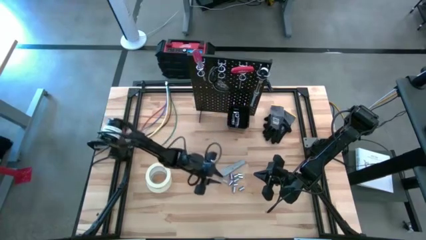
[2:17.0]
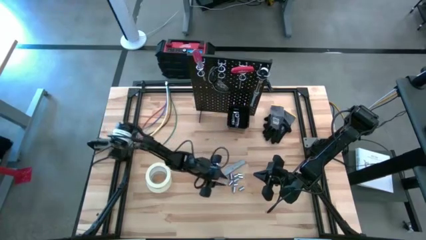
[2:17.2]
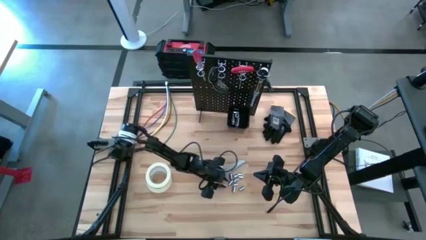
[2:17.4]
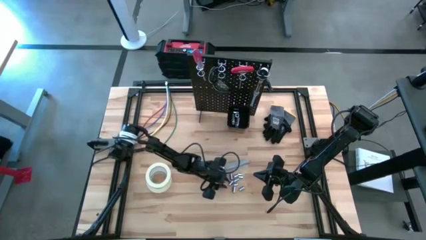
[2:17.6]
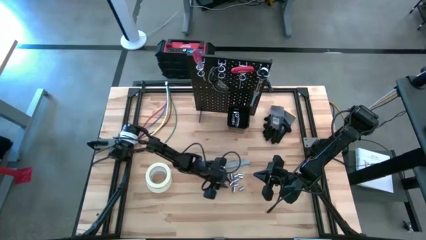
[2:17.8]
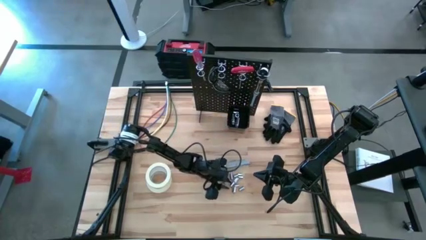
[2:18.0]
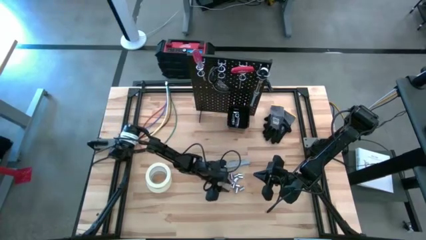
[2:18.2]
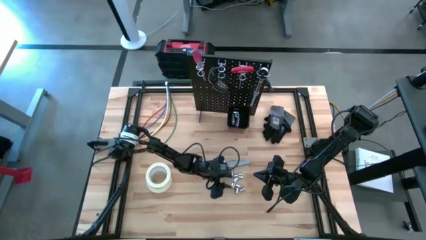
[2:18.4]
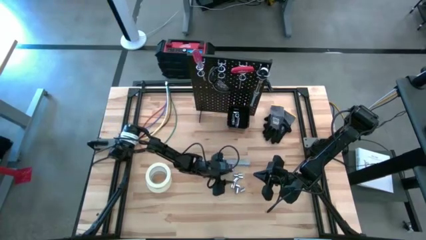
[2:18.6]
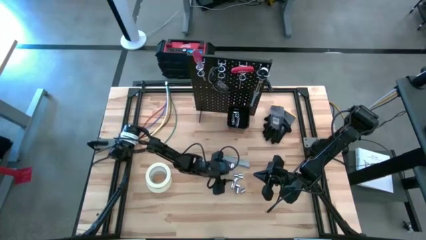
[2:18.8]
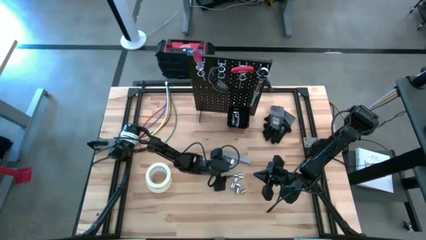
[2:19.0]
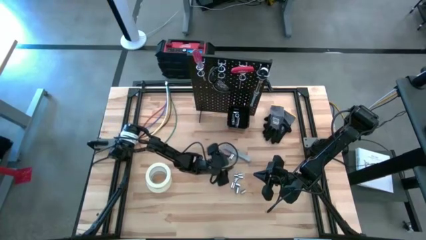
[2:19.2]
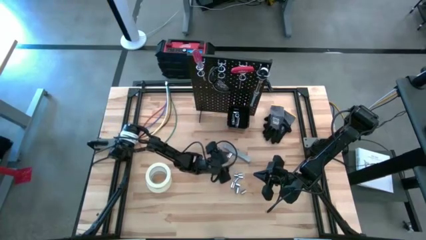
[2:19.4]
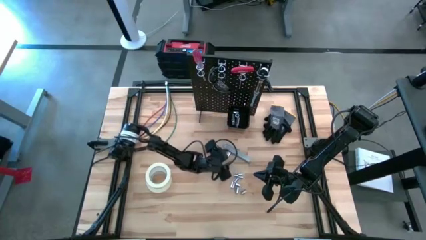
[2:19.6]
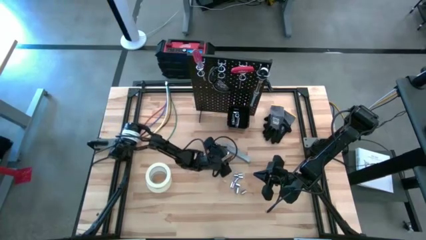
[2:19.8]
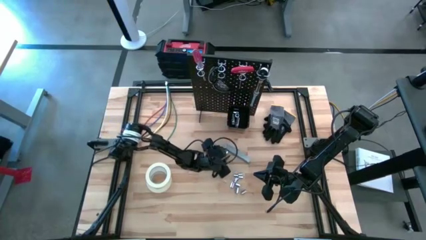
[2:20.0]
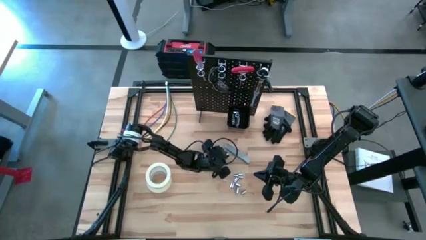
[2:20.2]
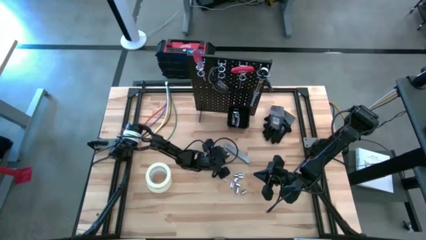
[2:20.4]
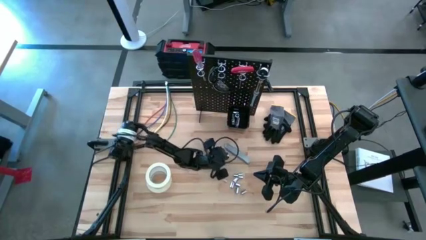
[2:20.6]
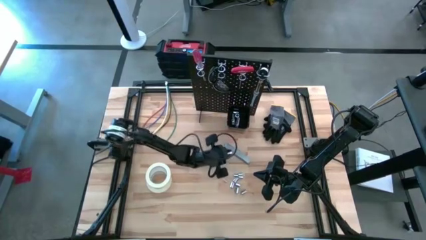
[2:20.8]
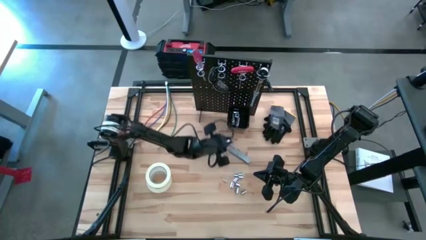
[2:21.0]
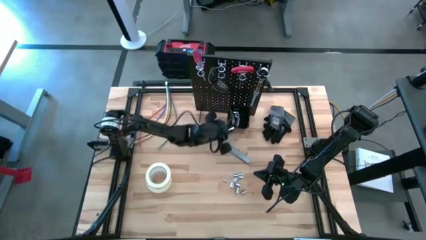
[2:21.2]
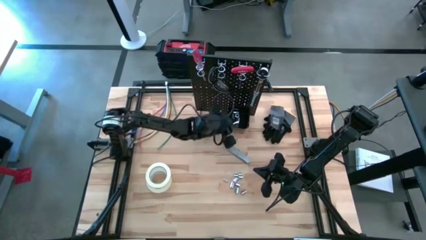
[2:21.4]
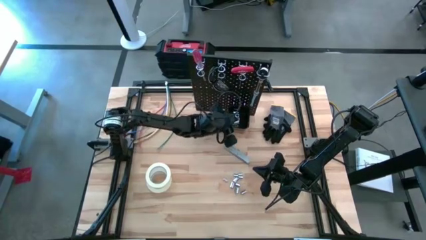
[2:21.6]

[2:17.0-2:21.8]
Task: Hang tools onto peg board
Put the socket into the black bin on the peg board

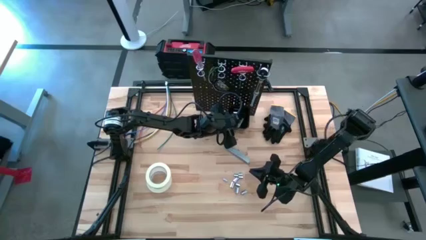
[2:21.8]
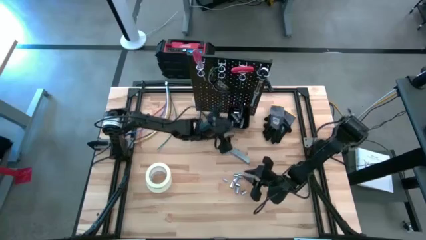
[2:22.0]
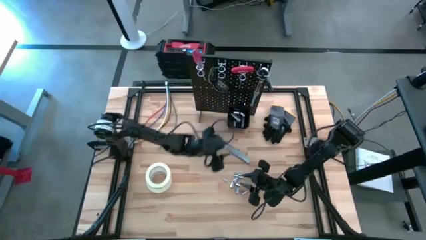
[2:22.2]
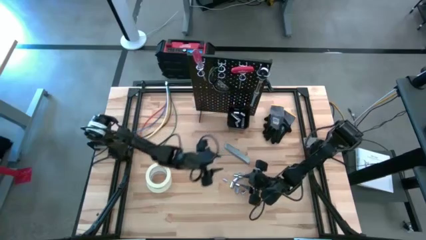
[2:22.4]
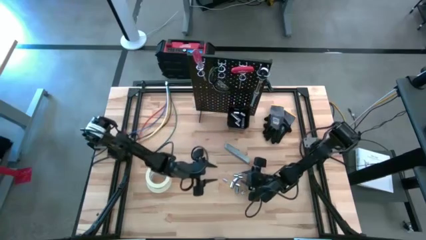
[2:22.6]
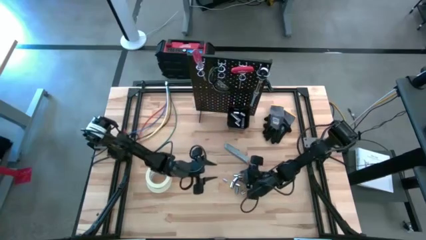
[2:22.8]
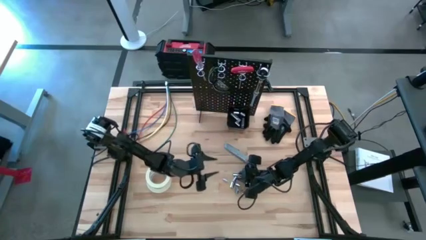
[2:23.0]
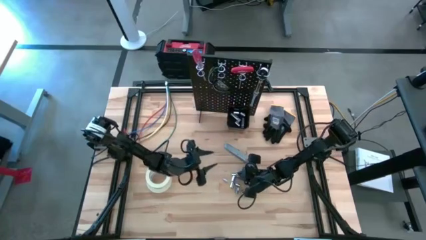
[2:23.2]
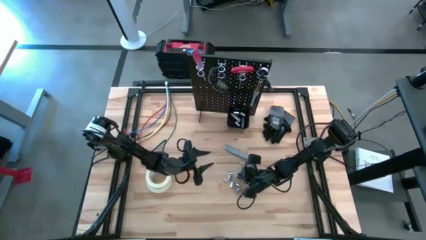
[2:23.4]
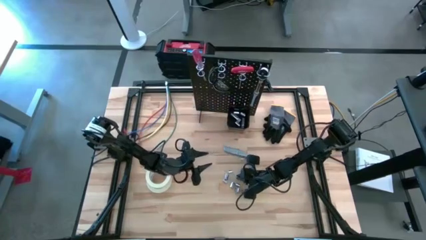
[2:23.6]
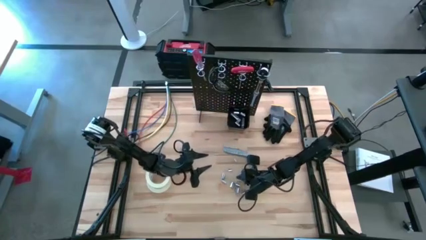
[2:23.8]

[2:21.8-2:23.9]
Put the socket into the black bin on the peg board

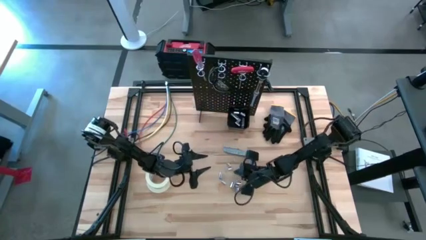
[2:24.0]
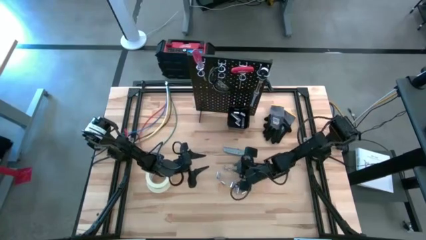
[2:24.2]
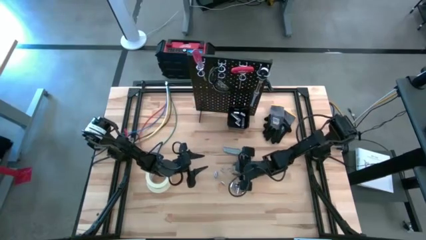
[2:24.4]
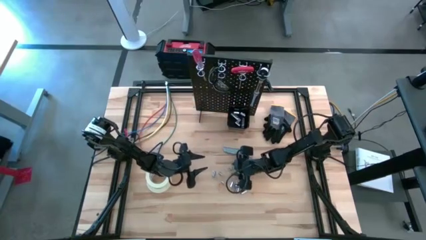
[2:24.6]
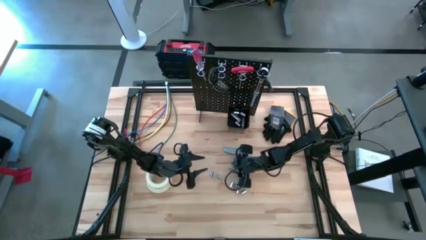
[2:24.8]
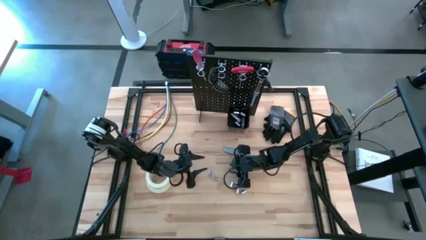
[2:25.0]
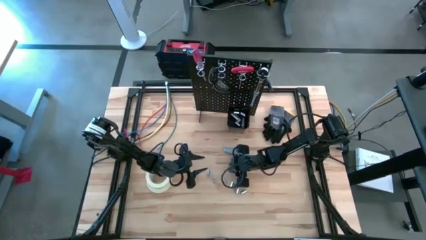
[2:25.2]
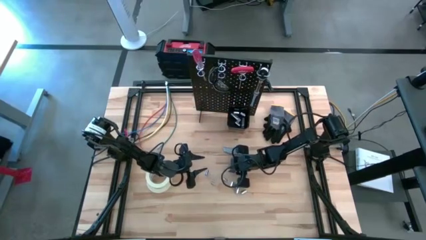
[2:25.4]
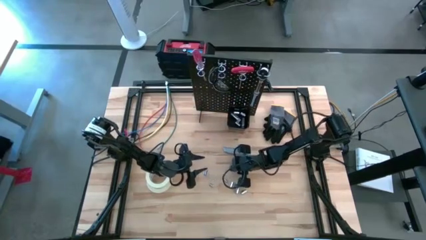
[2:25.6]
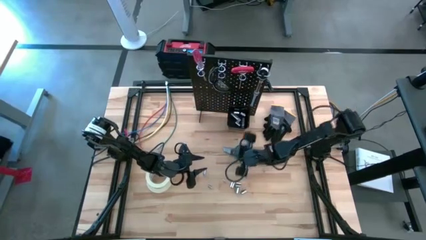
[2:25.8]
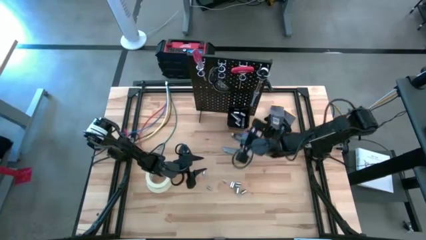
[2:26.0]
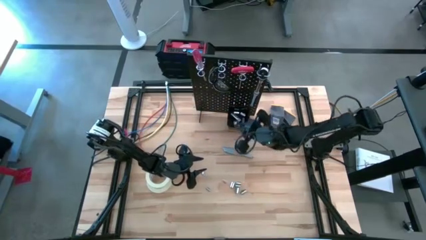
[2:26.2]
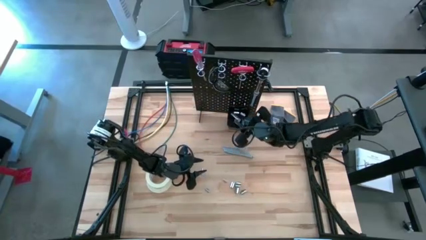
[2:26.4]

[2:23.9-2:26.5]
Put the socket into the black bin on the peg board

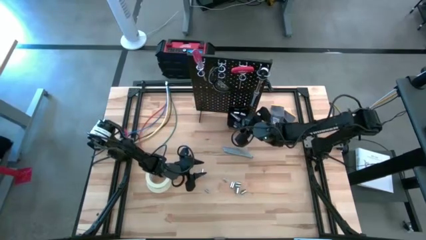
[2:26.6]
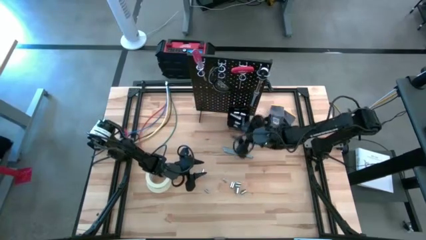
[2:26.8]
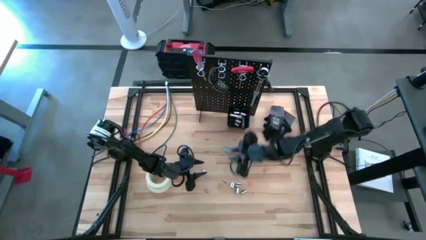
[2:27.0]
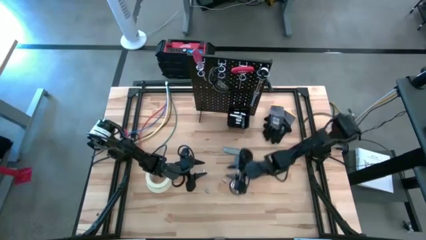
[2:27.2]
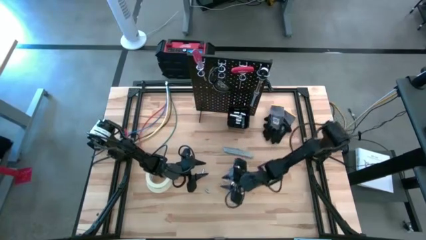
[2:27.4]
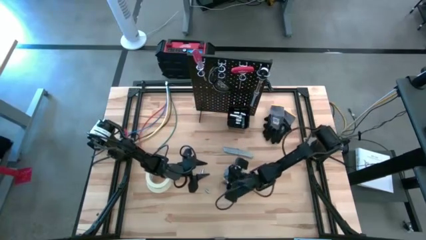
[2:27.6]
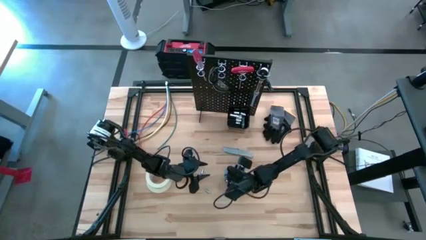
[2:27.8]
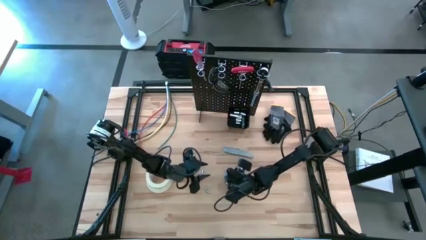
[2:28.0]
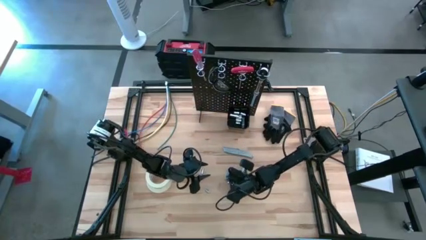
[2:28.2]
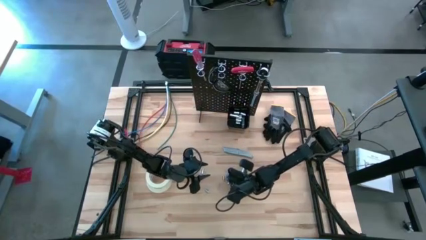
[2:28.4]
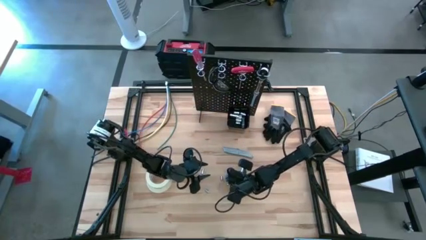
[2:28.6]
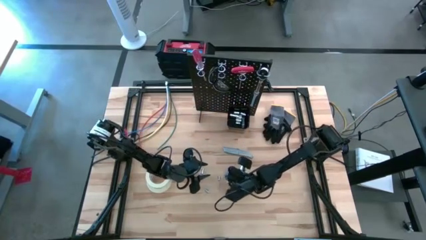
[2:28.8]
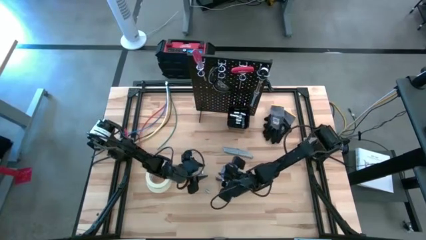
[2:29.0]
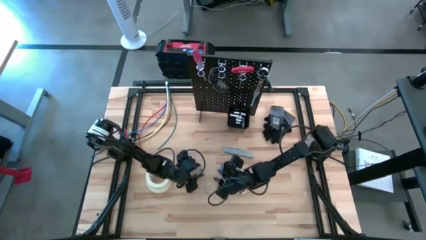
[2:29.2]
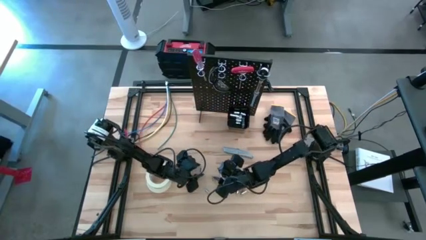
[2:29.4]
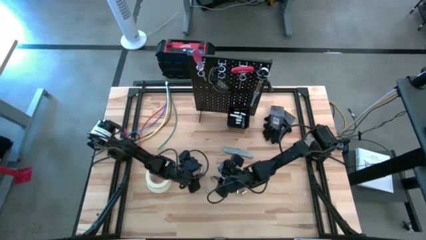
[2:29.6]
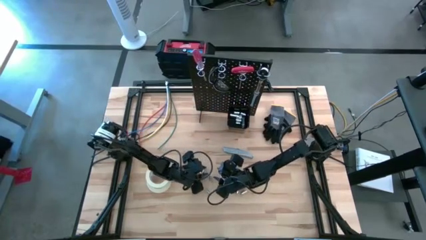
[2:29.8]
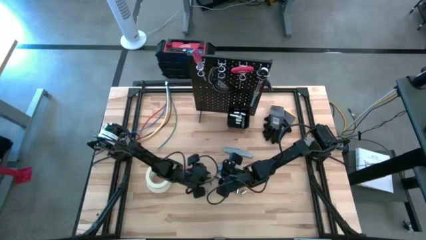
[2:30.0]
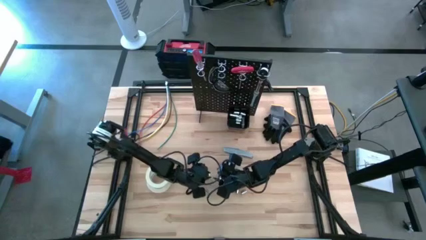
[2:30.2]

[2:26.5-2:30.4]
Put the socket into the black bin on the peg board

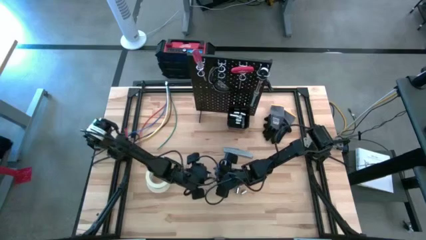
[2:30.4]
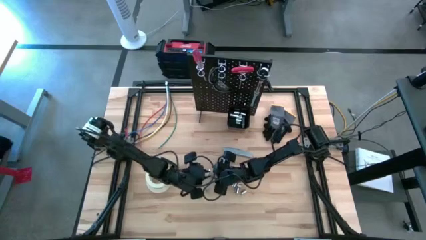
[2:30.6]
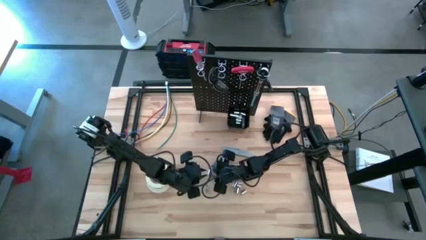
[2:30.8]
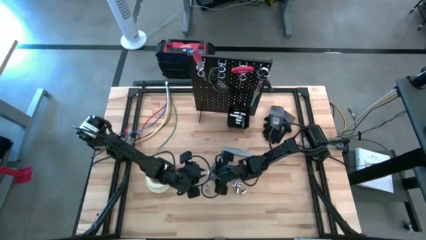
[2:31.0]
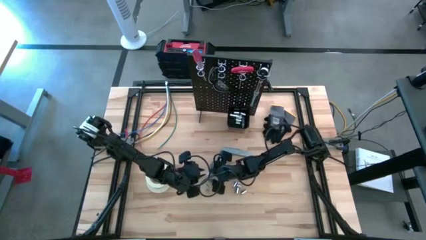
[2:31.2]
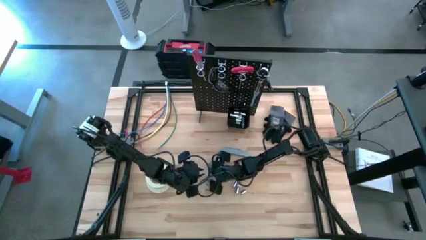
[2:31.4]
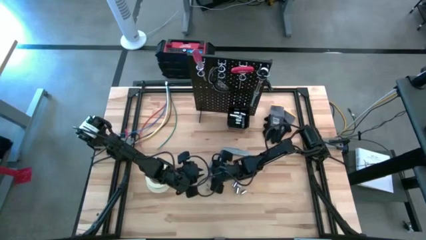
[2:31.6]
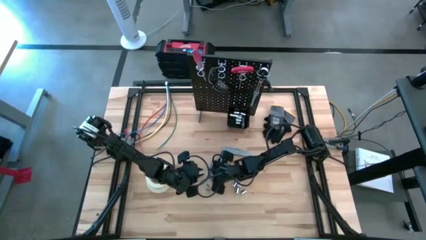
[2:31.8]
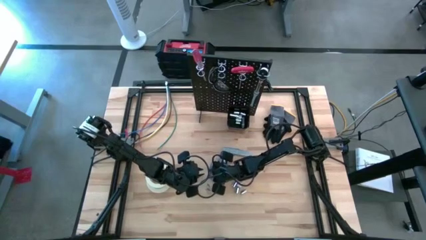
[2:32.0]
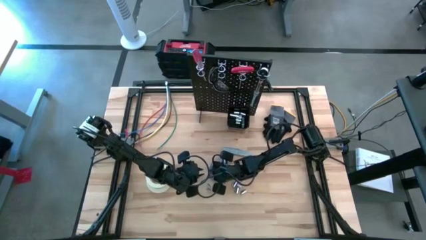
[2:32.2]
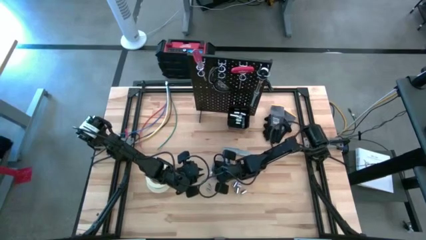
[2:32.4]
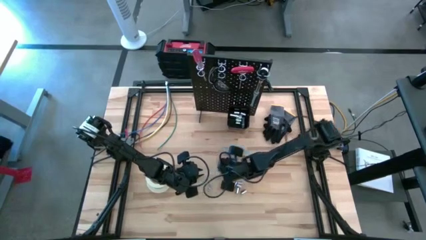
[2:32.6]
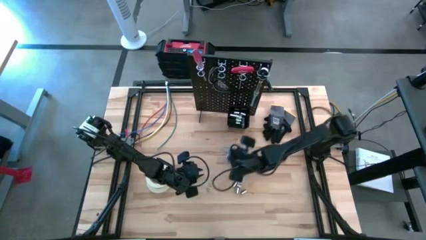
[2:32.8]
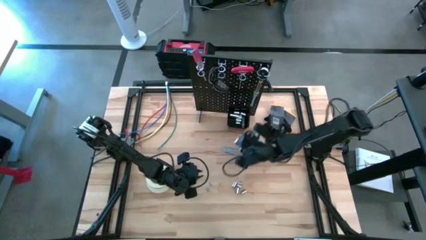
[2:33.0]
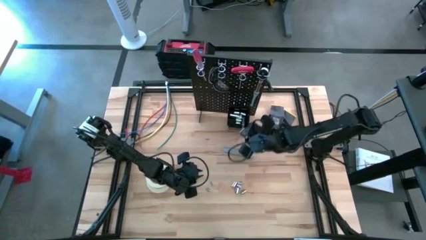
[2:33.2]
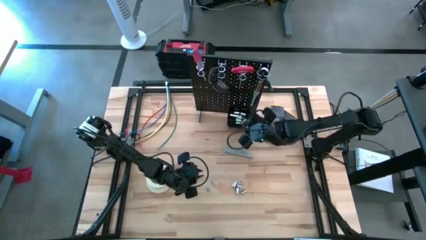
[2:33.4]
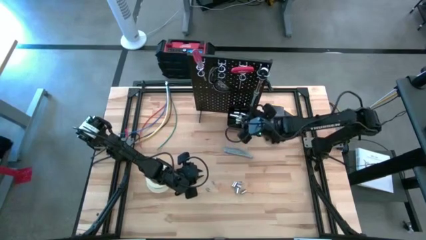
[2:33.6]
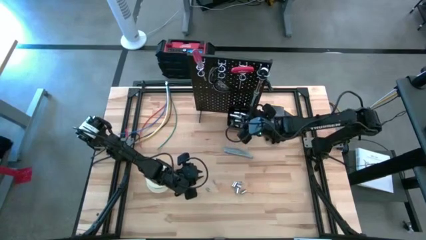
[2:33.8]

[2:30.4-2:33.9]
Put the socket into the black bin on the peg board
